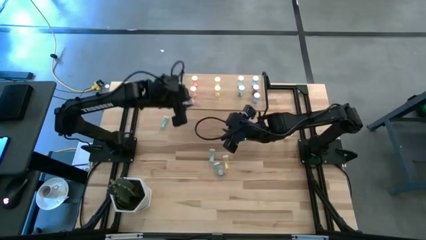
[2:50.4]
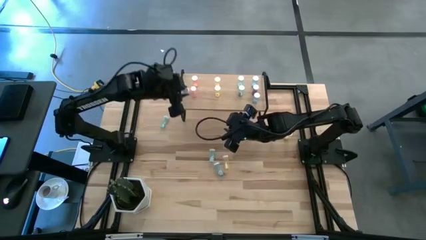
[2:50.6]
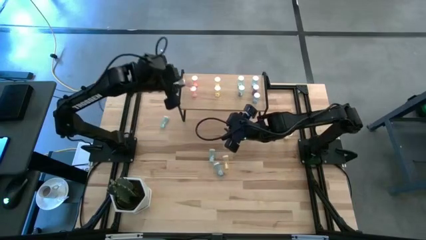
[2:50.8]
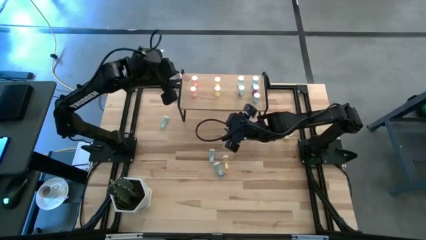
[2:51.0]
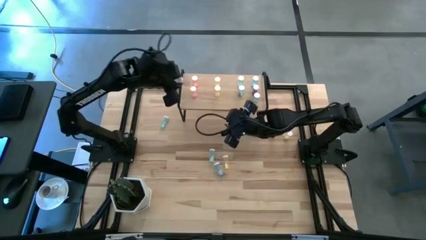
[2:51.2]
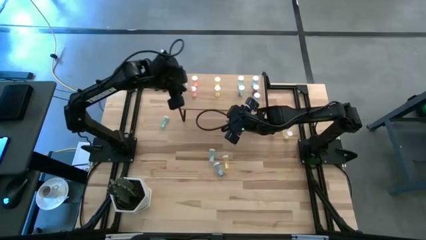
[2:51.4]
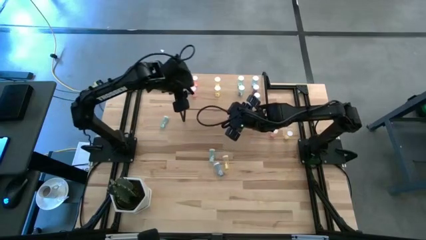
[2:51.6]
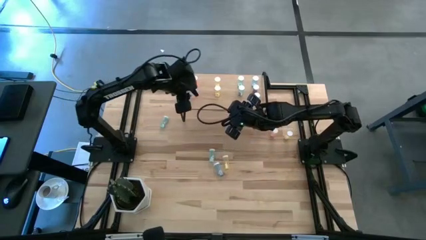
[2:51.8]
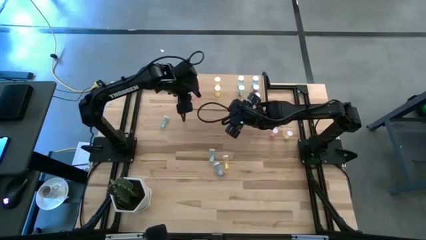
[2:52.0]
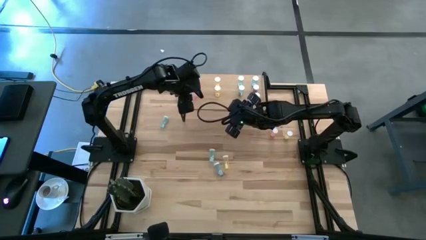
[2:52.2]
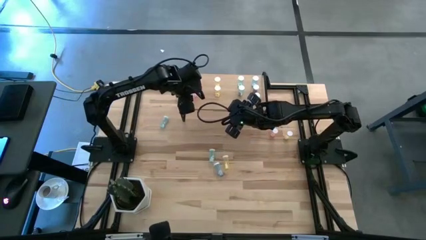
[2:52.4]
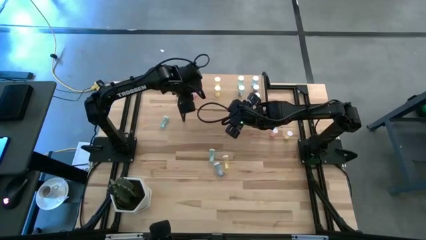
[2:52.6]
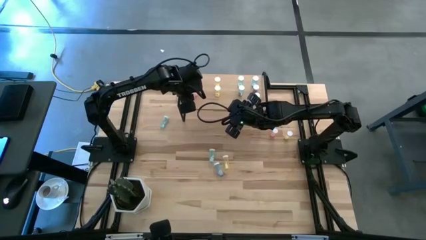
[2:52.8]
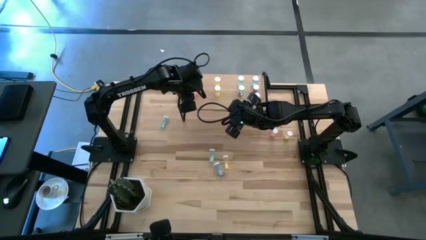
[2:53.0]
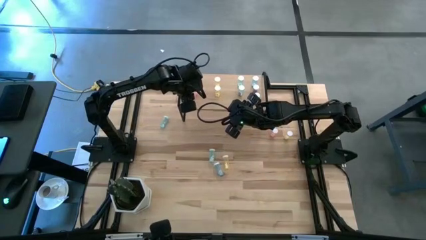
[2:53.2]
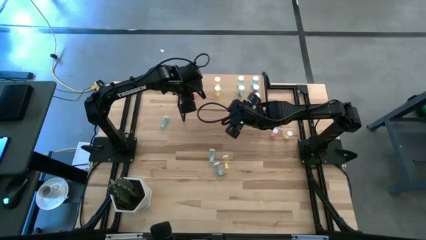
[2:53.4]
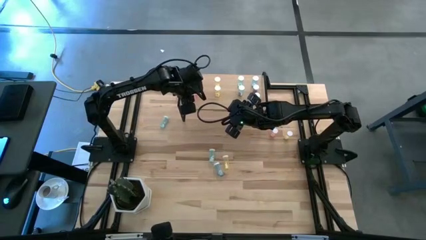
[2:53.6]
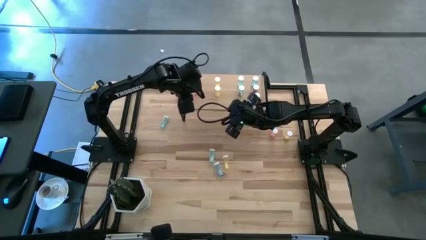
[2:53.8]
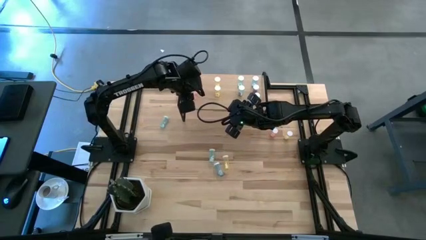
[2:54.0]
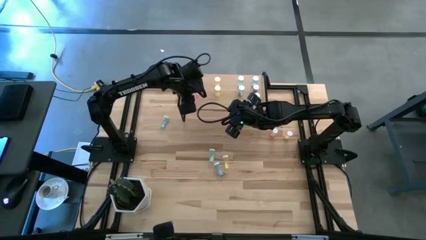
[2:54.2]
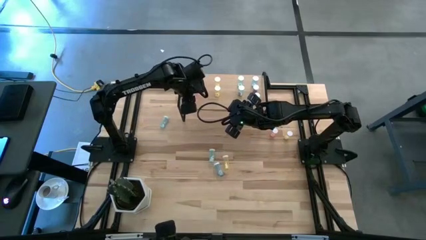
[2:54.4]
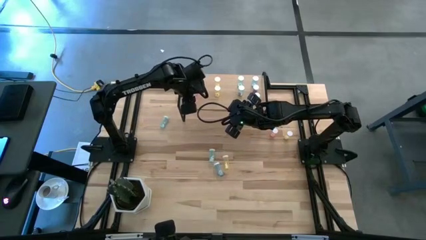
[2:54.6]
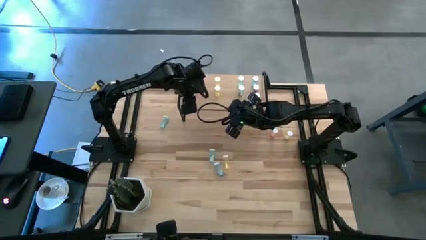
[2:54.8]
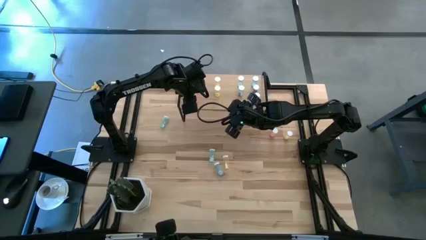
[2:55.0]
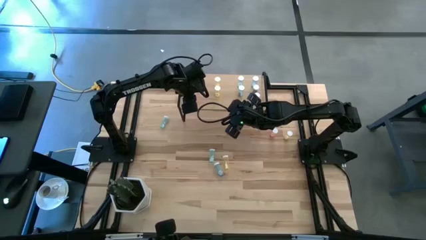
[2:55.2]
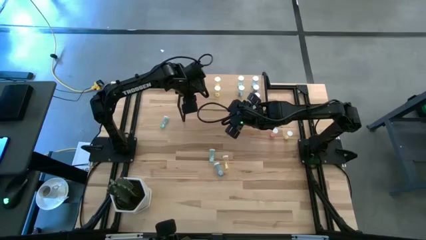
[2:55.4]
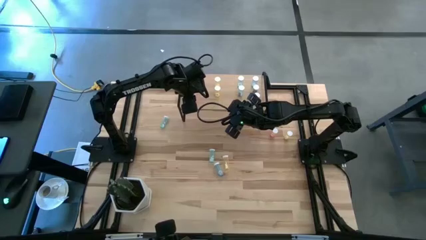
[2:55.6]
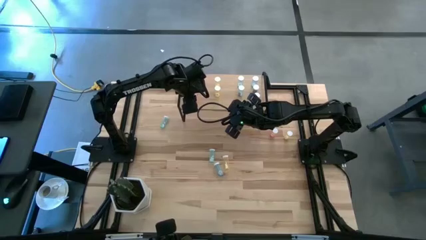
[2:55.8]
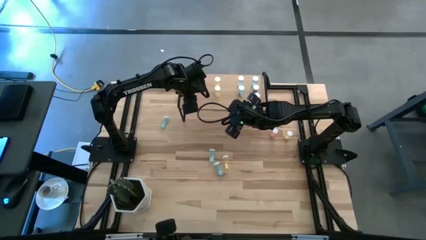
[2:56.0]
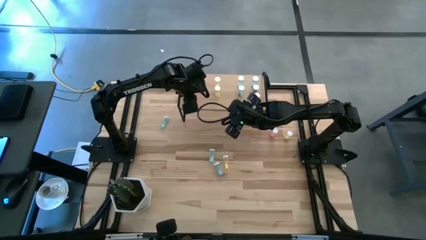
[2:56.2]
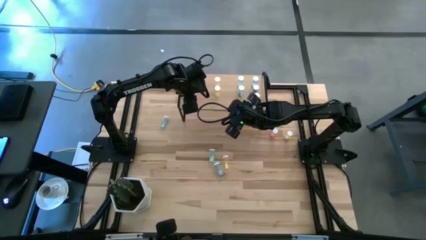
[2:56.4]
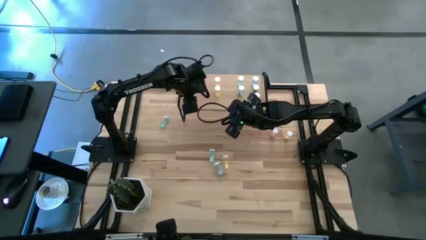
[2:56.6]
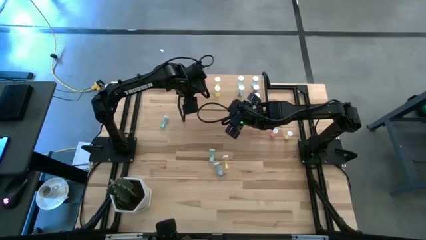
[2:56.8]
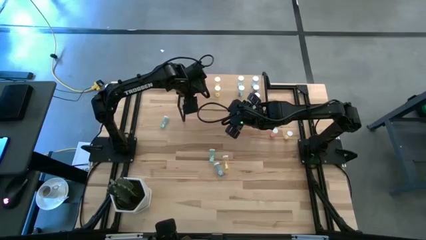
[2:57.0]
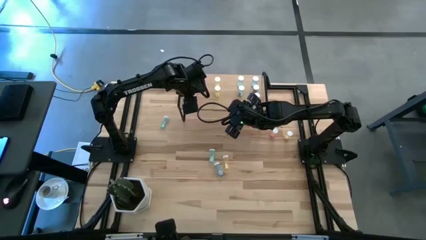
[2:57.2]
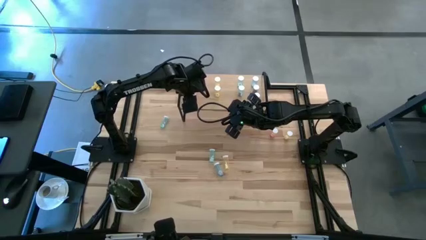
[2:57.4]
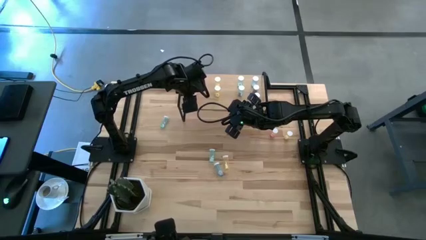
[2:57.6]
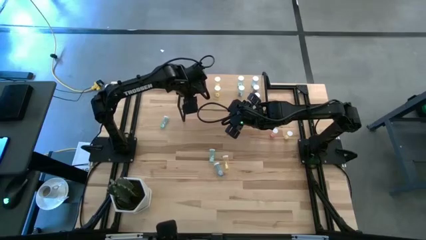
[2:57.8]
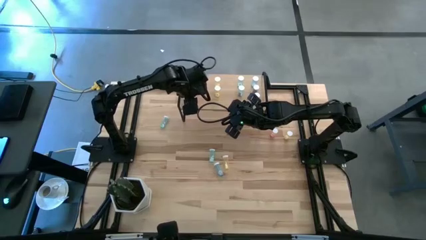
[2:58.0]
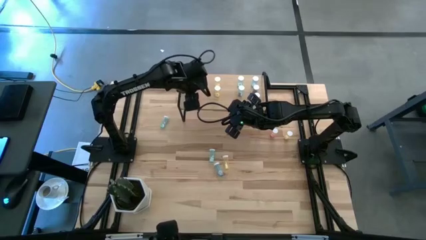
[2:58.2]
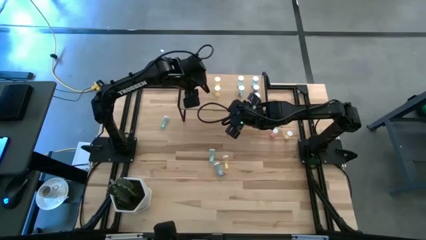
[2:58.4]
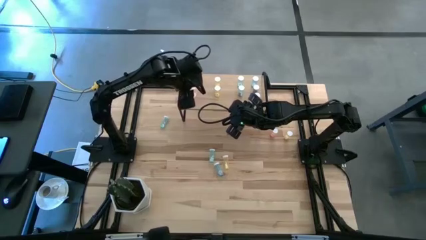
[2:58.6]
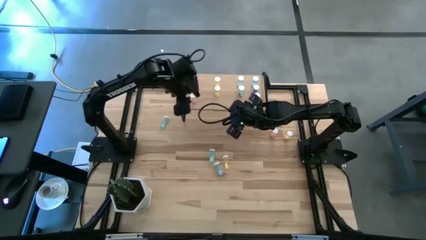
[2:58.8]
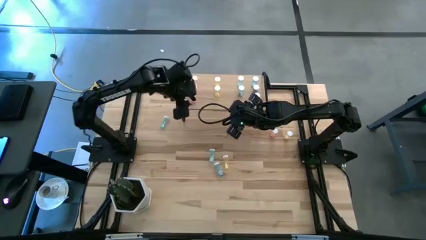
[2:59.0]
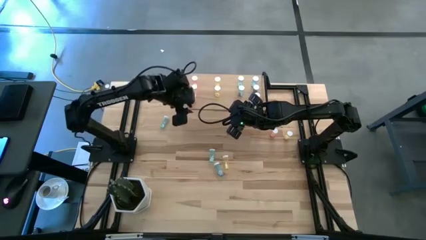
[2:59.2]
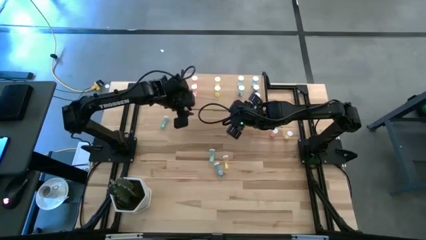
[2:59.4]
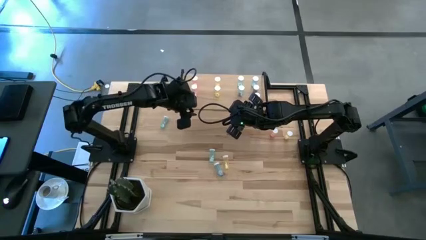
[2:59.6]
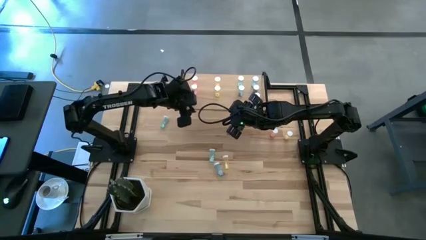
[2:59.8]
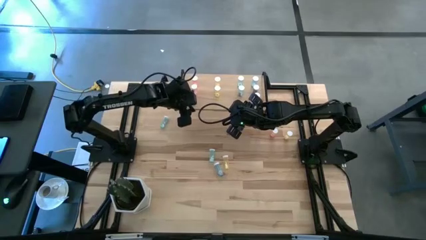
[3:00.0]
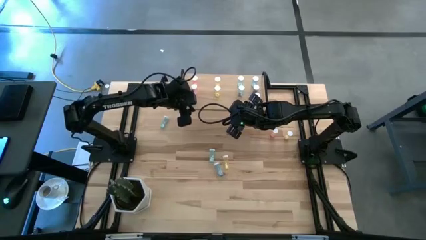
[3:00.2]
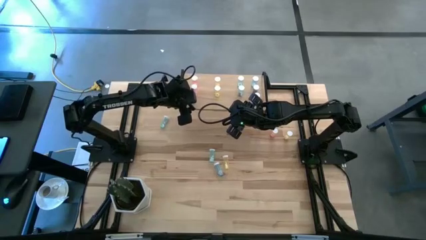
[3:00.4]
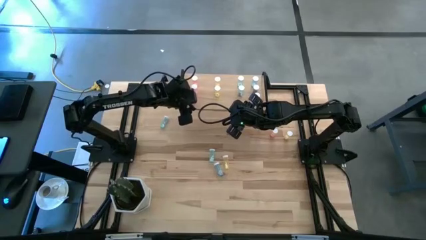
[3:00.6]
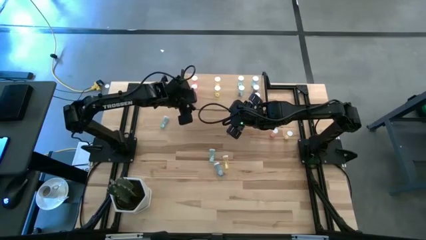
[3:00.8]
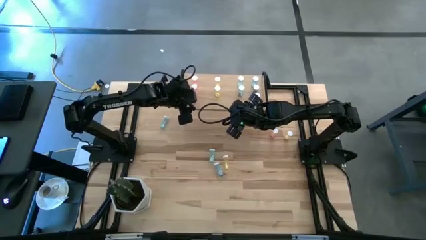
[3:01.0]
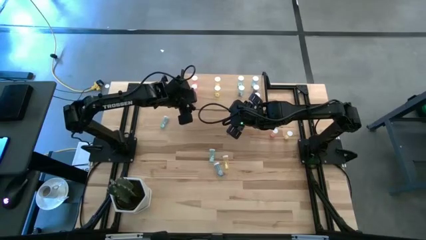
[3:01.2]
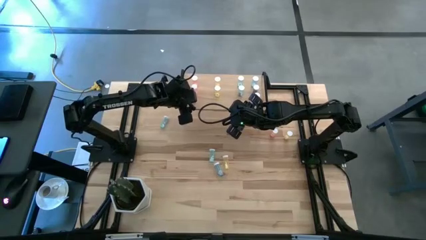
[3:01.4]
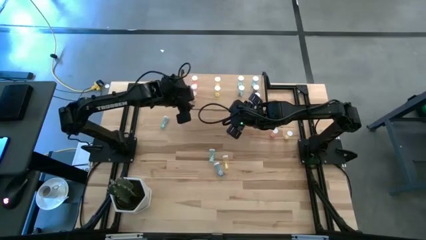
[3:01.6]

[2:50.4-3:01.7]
Task: Pick and place medicine bottles onto shelf by color
Put the pink pill bottle on the shelf aligned with the other pink pill bottles
